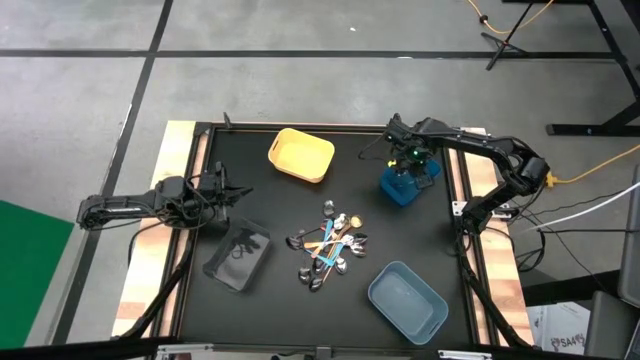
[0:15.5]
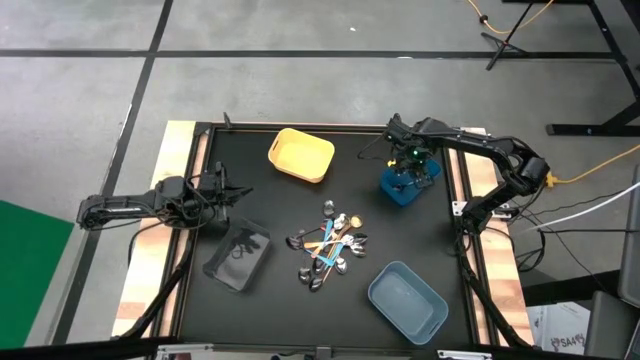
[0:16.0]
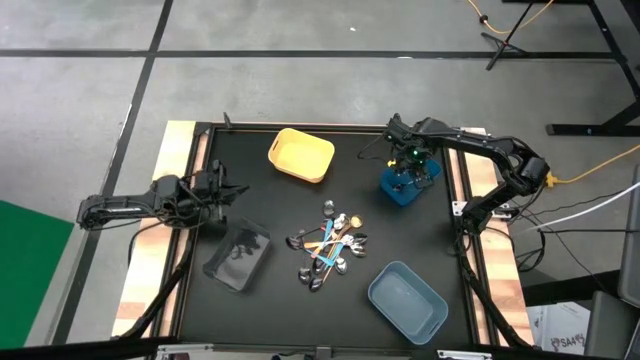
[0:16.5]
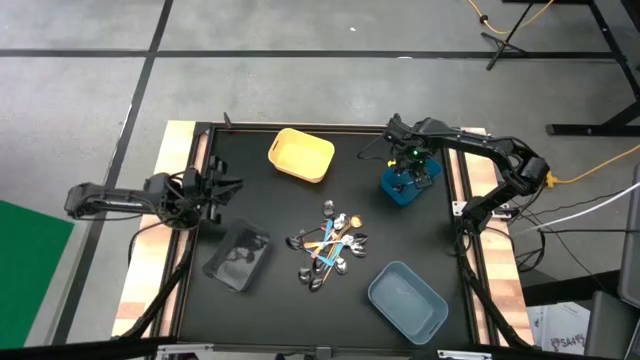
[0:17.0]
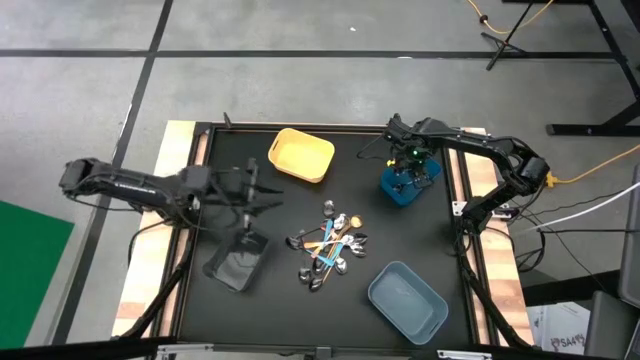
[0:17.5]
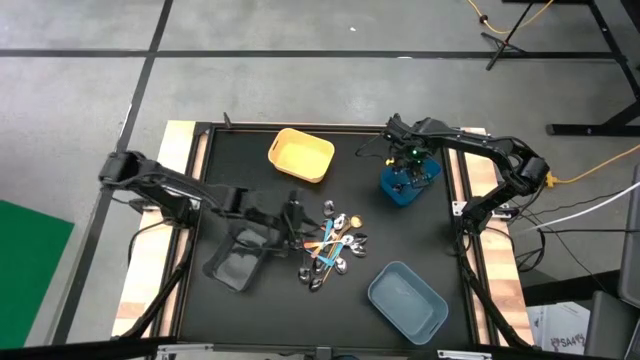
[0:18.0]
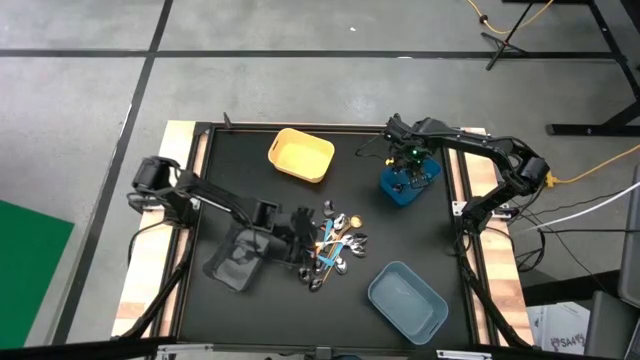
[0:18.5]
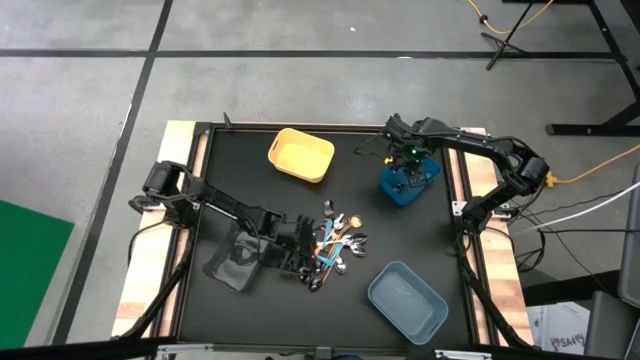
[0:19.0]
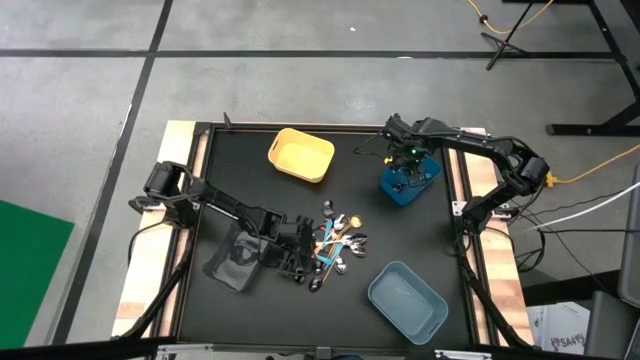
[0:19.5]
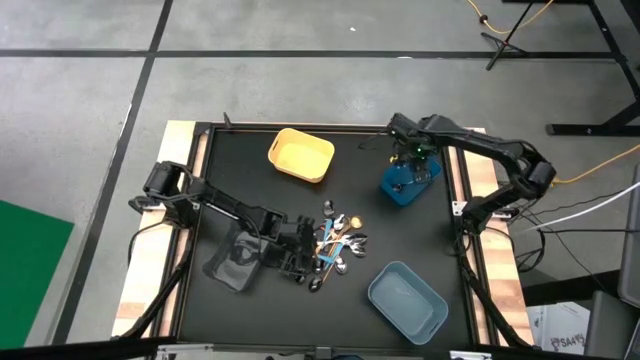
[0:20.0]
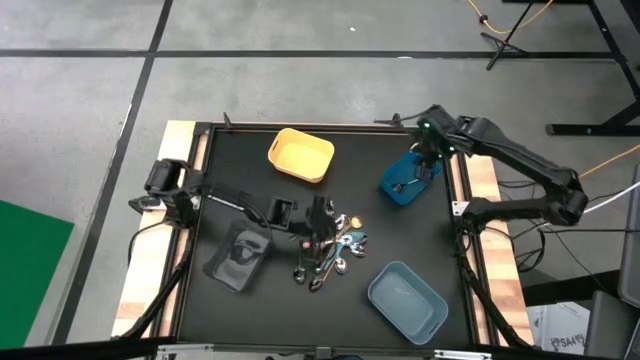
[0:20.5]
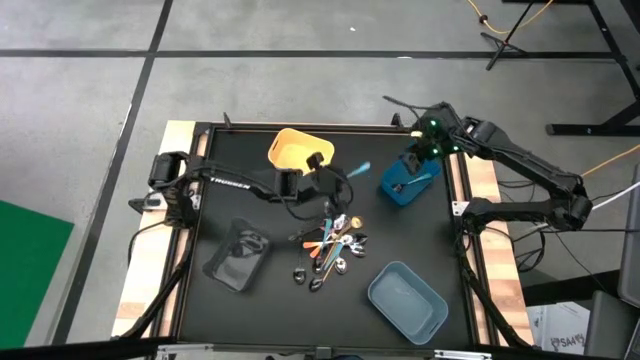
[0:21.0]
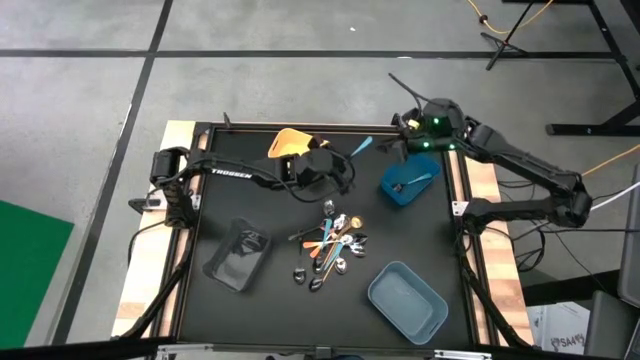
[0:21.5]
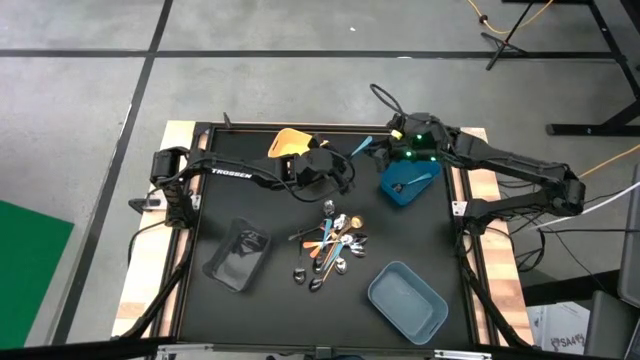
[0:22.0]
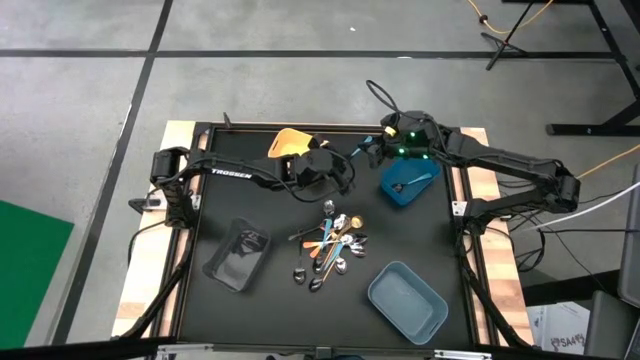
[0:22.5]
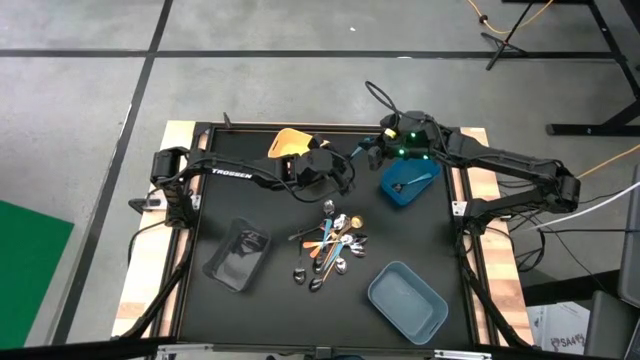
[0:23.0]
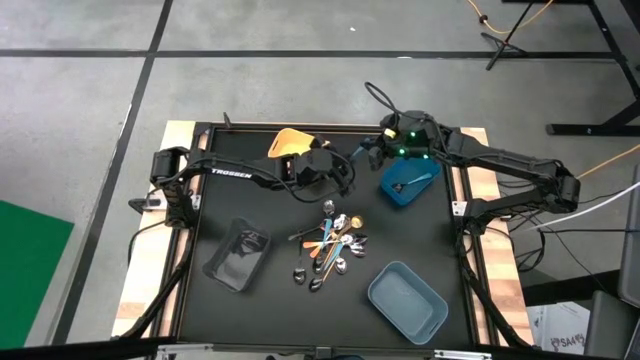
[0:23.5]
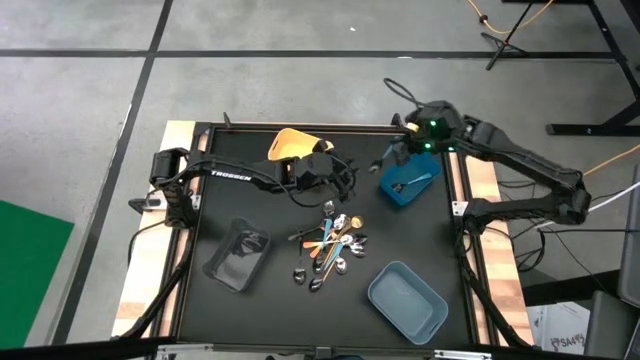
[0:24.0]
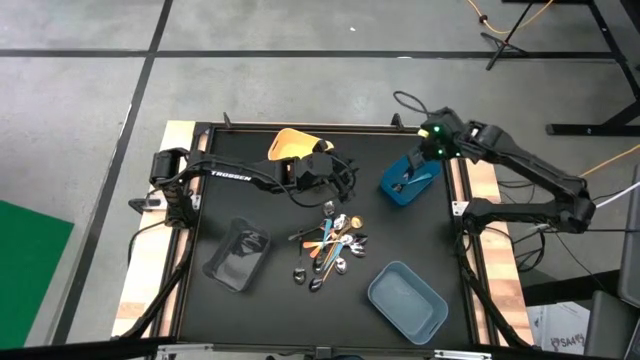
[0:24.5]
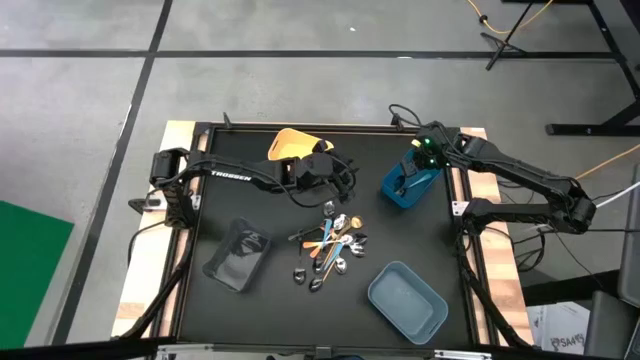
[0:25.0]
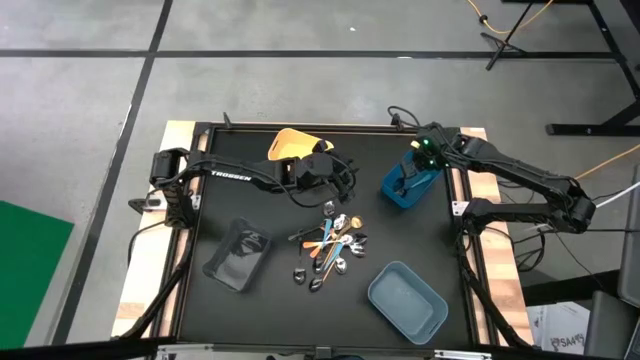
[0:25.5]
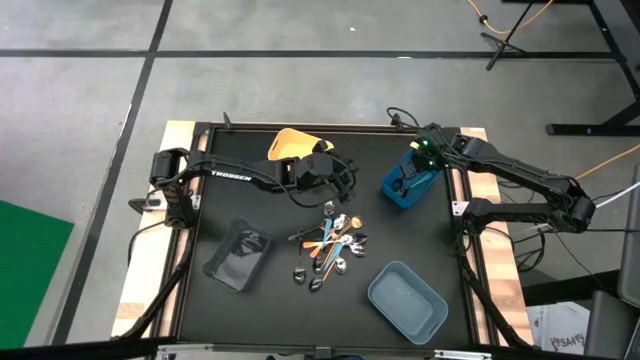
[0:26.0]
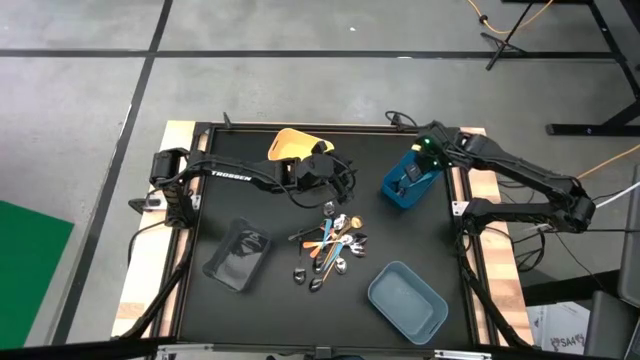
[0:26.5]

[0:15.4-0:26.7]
Task: Sort silverware by color (type)
Put the light blue spoon into the blue bin

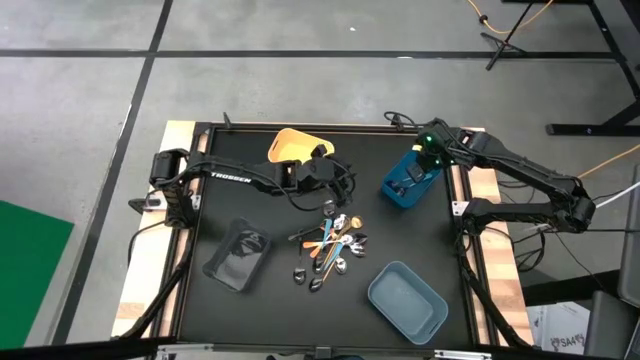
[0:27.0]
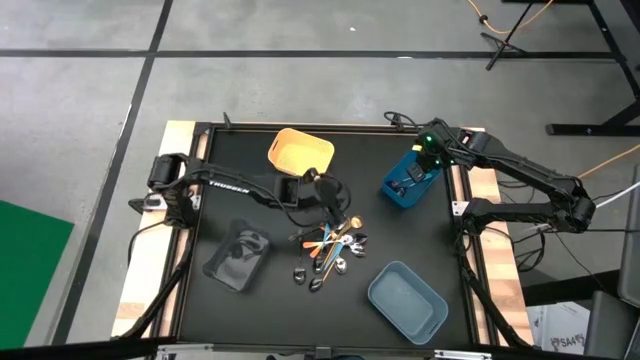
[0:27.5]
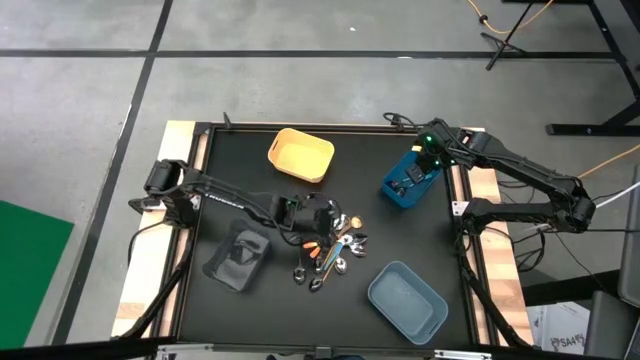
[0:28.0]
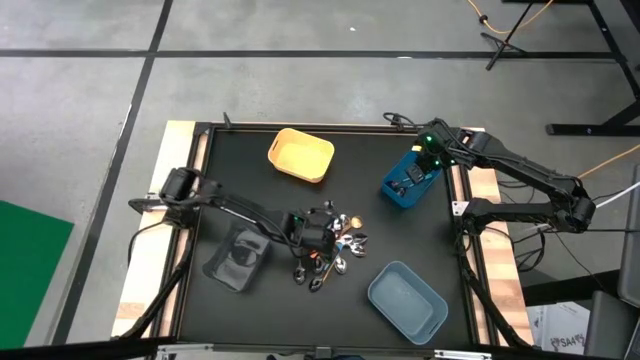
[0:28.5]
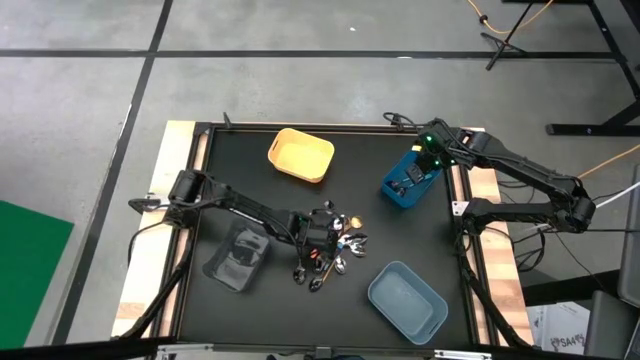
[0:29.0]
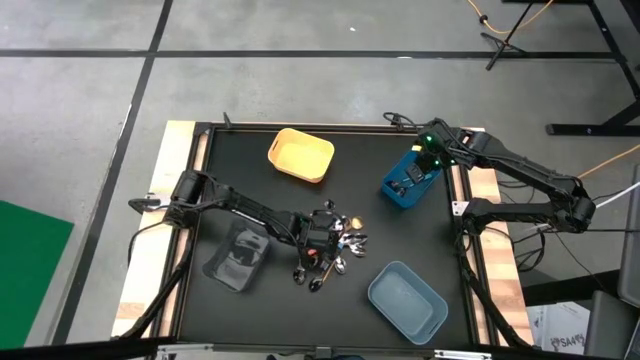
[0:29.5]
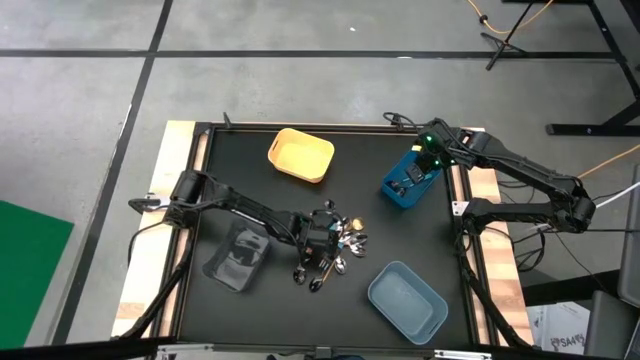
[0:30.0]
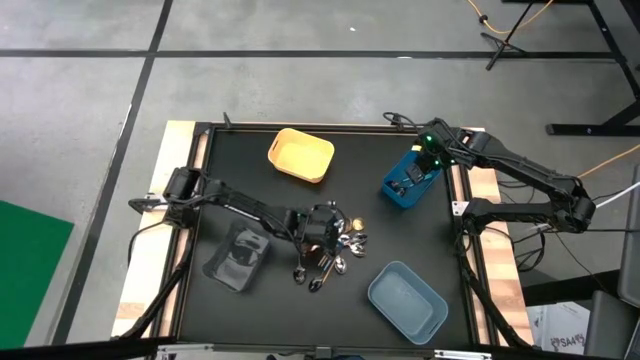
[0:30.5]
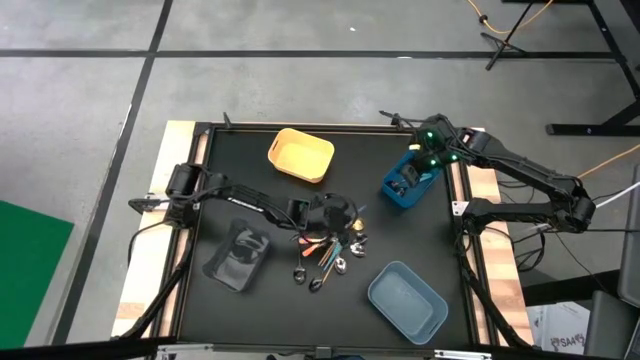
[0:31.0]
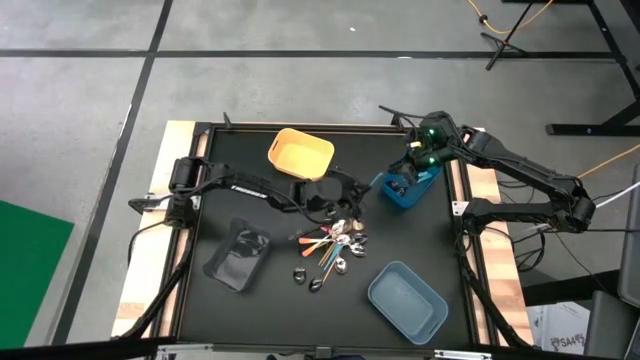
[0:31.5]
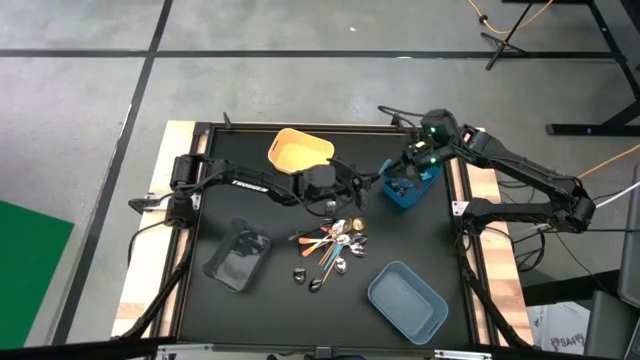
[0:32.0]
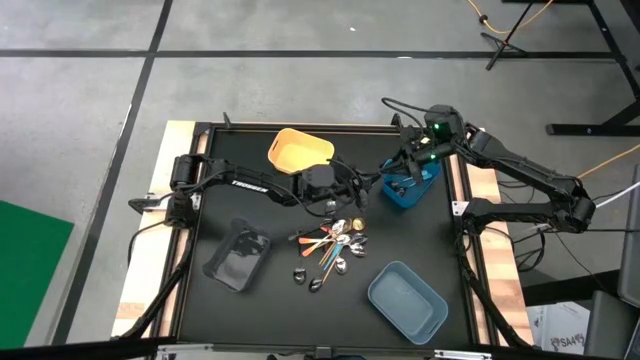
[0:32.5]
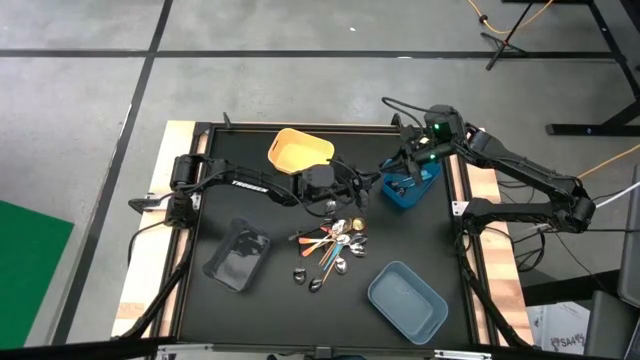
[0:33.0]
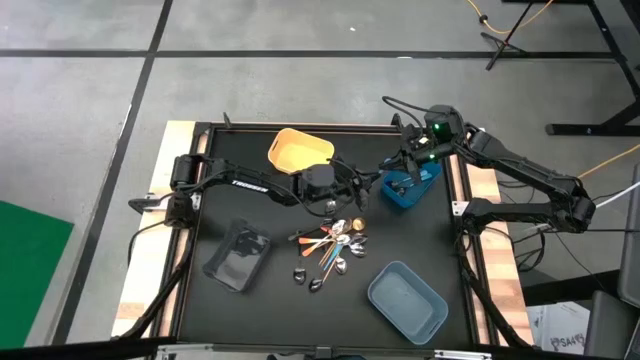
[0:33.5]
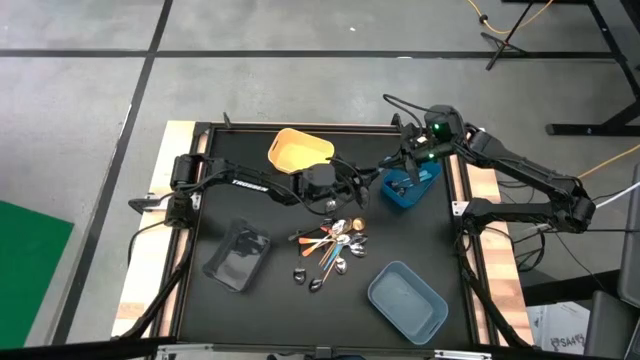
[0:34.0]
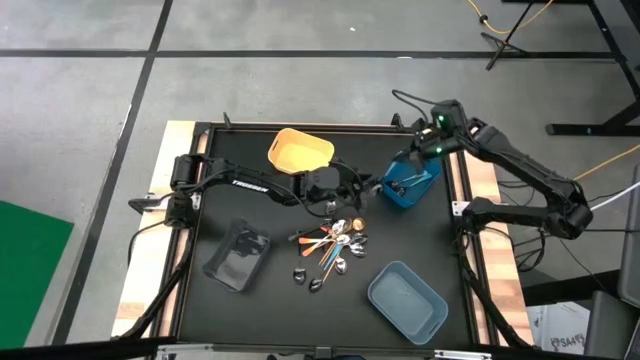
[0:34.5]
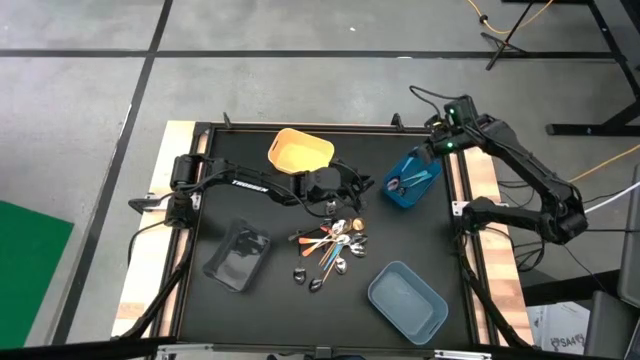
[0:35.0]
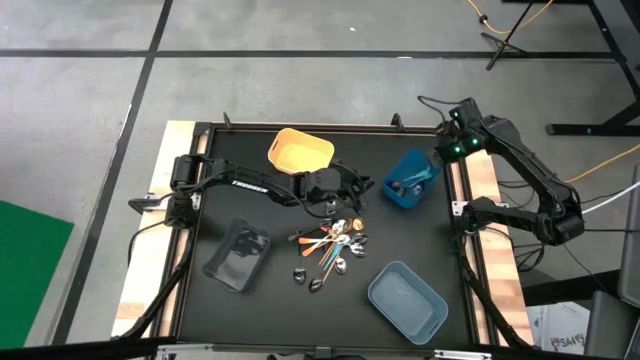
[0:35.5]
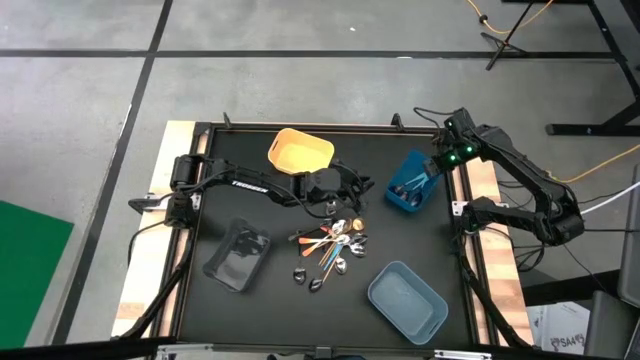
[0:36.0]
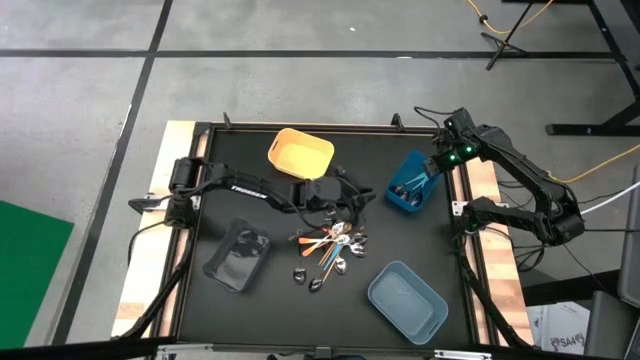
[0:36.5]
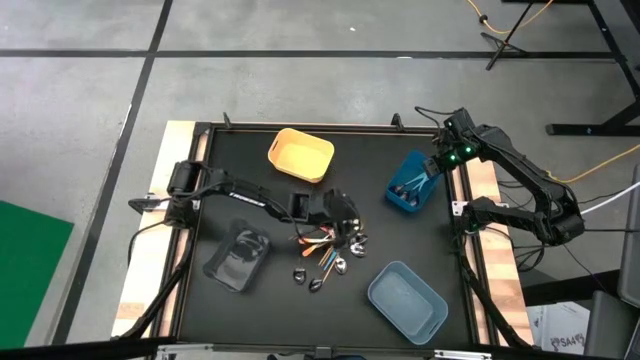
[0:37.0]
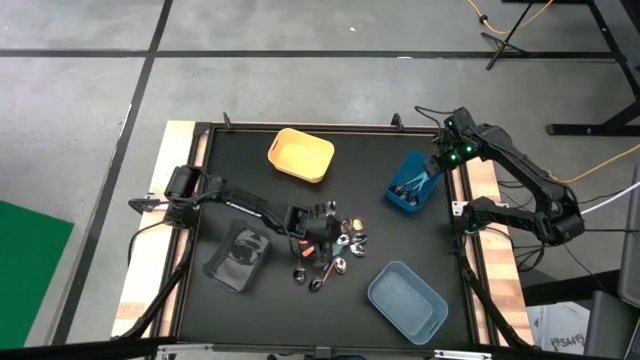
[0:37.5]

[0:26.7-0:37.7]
Put the light blue spoon into the blue bin
